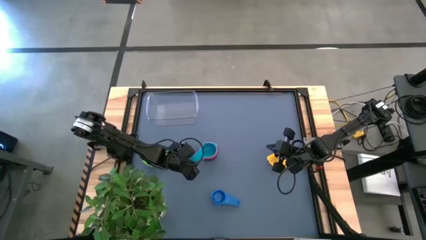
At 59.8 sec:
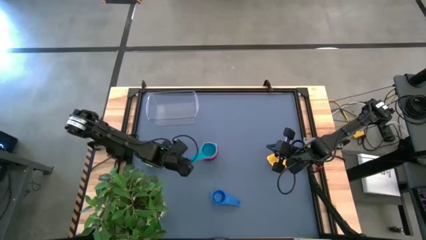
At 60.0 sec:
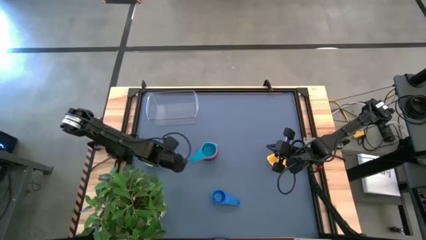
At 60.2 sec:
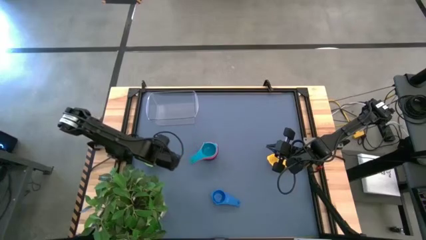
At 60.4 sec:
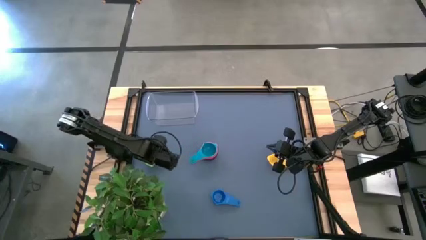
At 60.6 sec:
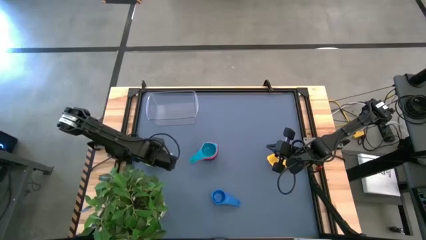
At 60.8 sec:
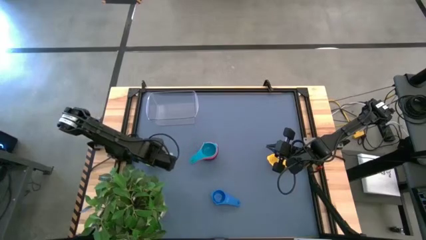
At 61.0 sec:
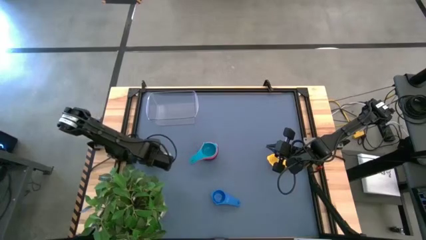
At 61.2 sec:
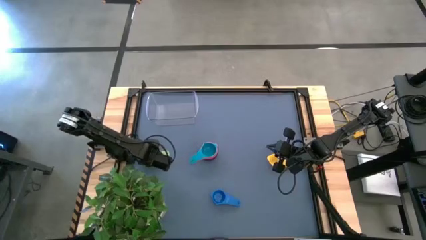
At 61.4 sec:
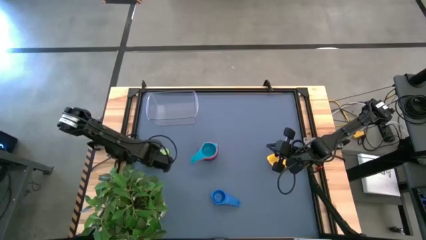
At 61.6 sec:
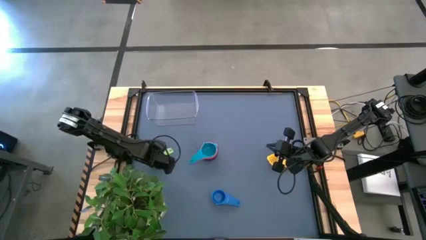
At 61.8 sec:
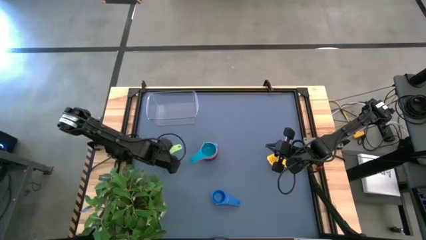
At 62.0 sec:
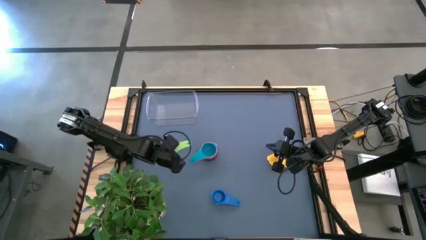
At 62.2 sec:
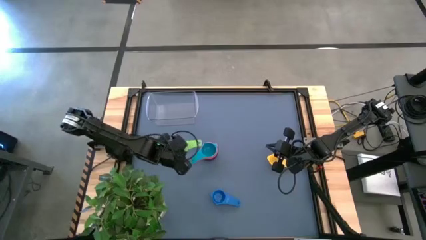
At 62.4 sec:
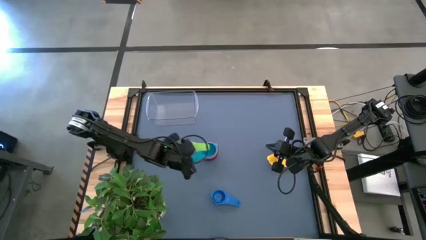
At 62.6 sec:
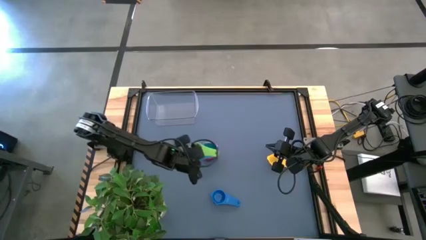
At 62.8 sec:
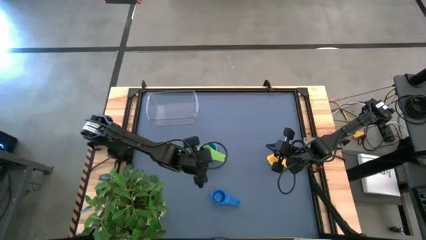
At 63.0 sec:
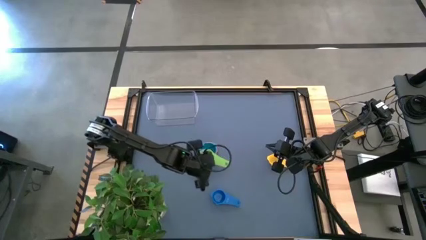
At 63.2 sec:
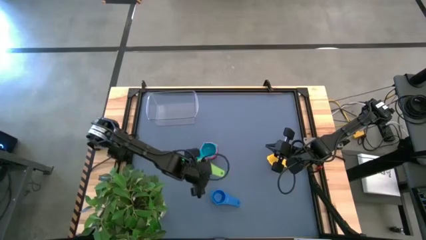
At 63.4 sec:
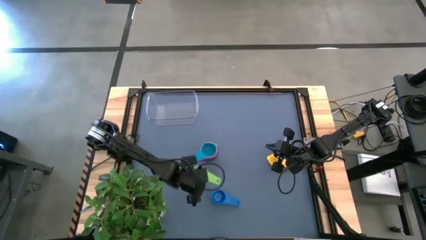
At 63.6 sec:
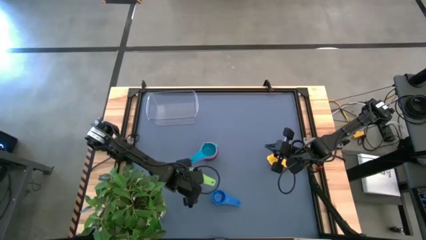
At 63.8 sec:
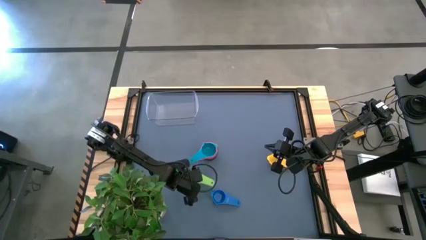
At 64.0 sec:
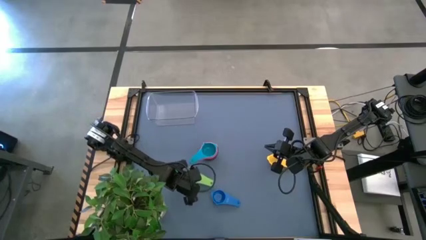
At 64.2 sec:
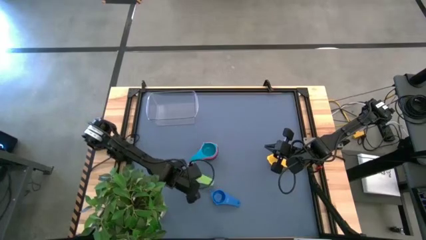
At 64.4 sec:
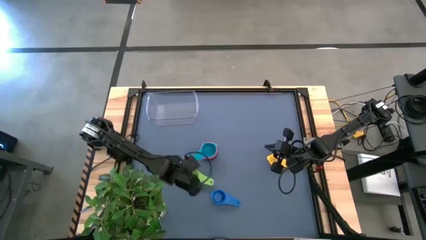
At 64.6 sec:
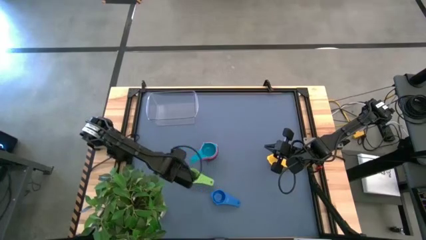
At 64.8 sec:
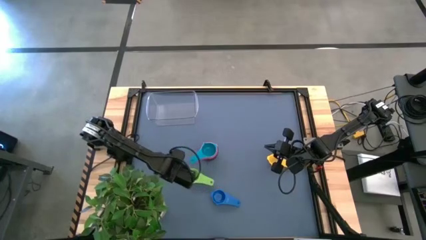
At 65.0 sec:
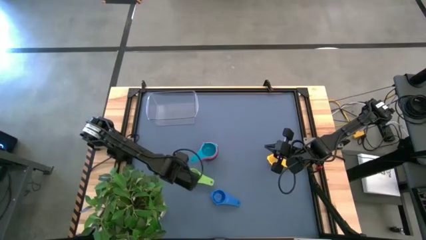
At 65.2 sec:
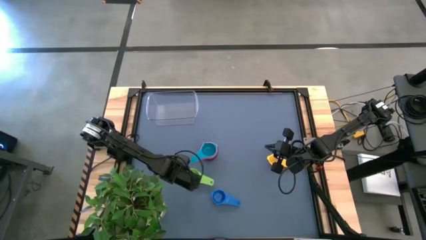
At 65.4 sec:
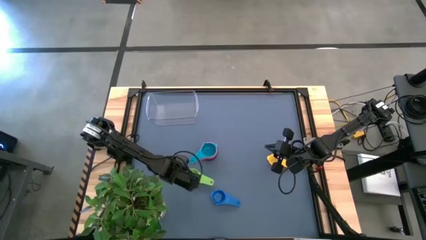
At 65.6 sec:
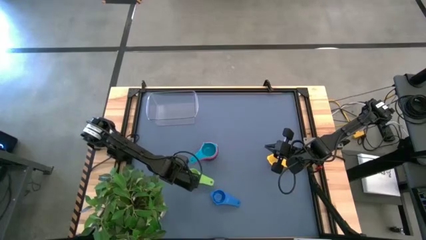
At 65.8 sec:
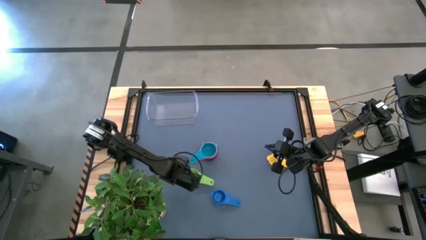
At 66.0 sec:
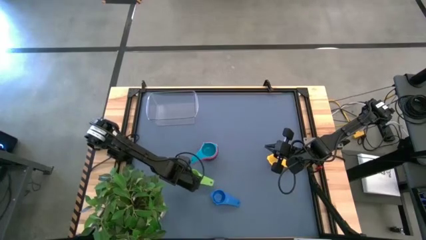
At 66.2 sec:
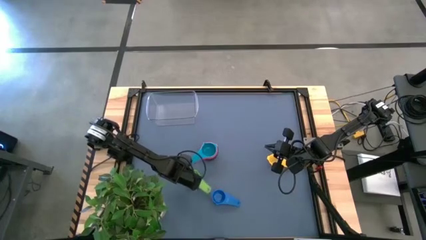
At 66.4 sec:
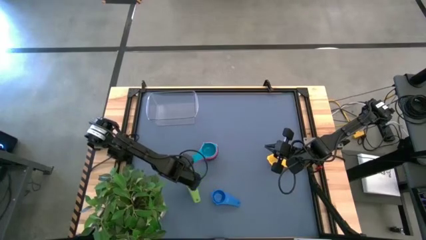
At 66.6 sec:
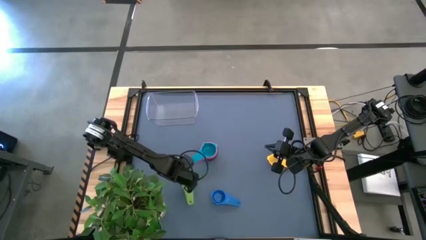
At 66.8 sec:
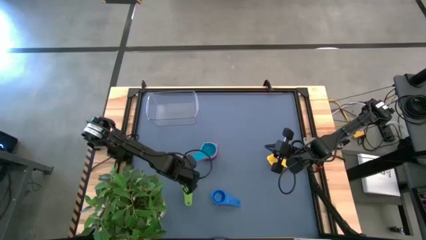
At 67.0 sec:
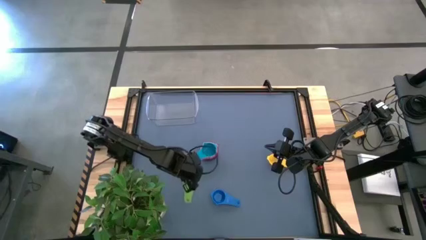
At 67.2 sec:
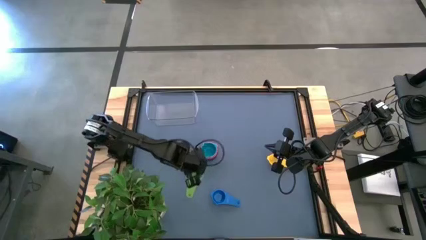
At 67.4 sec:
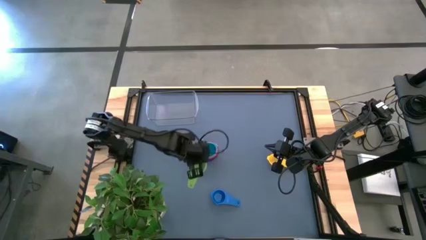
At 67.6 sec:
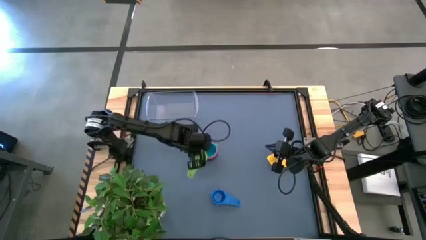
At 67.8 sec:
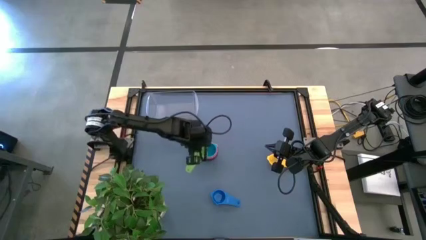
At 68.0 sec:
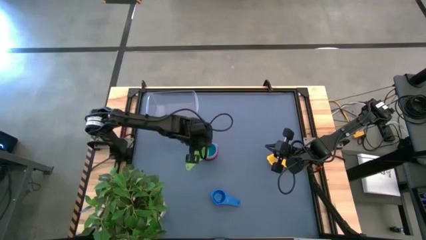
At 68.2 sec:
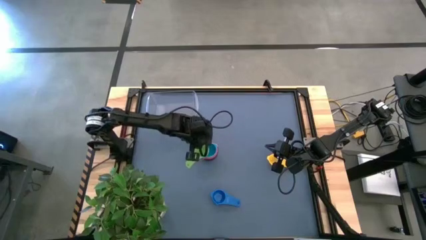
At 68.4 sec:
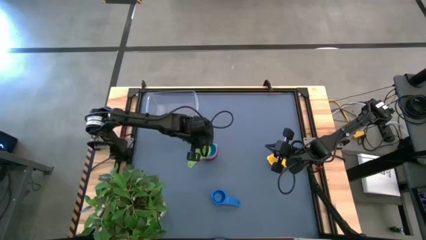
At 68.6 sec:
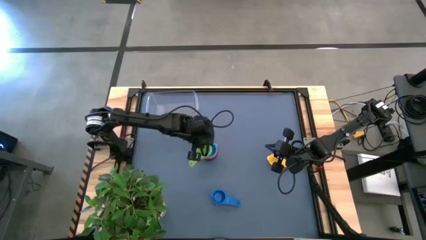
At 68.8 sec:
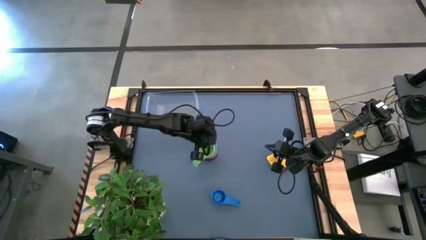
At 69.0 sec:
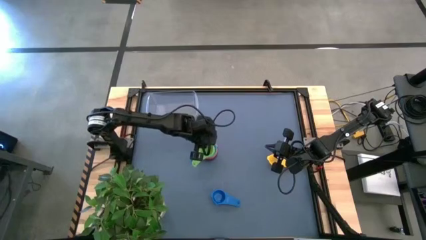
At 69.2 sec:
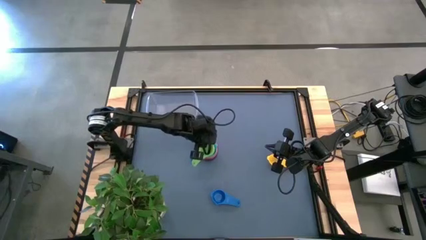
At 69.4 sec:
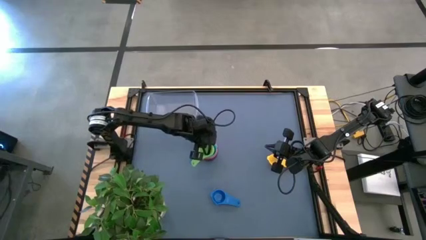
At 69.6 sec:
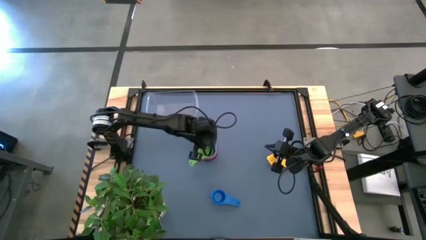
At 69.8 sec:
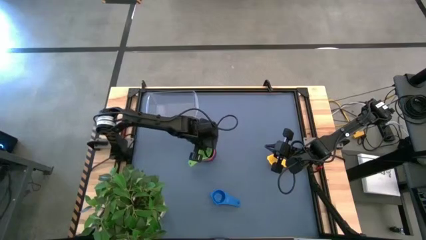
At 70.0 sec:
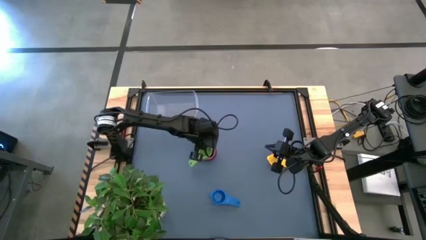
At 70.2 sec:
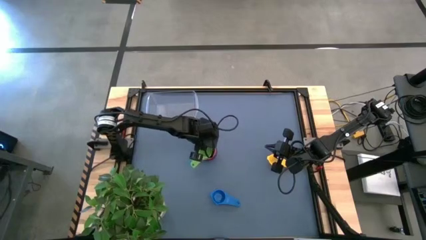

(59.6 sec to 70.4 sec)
Task: Nest measuring cups in basket
Stack the green measuring cup on top of the light blue measuring cup
